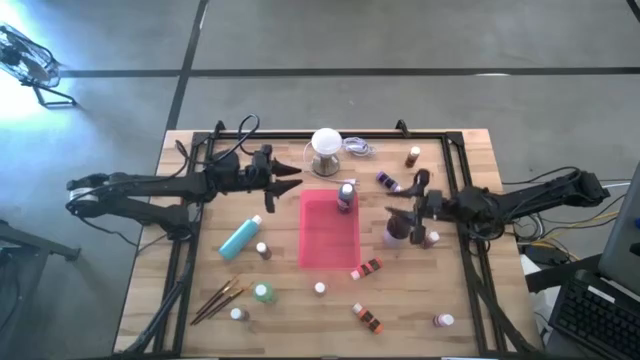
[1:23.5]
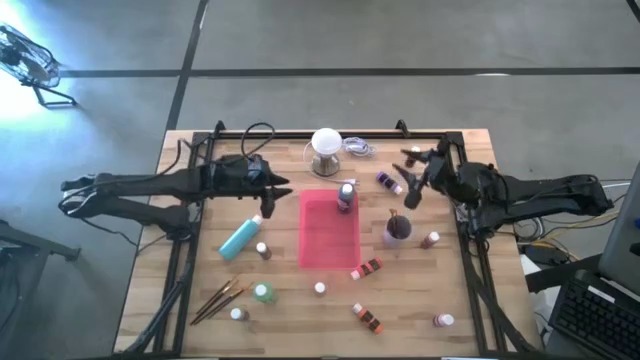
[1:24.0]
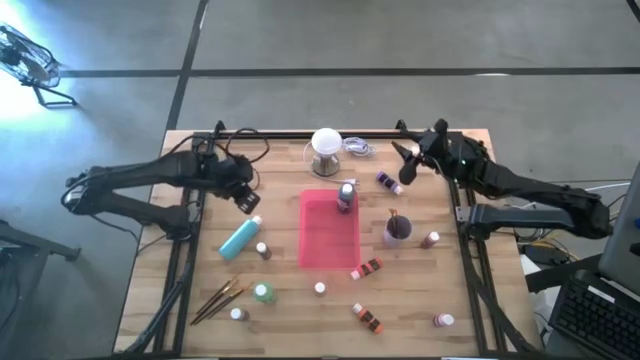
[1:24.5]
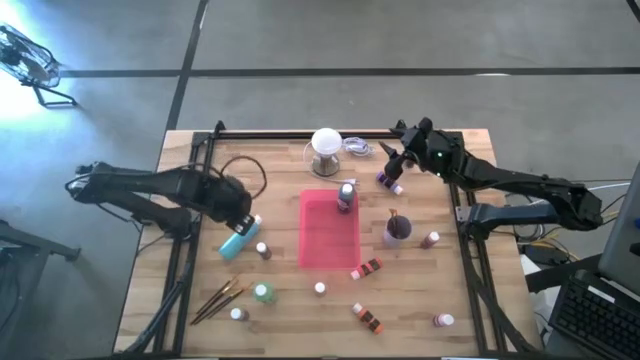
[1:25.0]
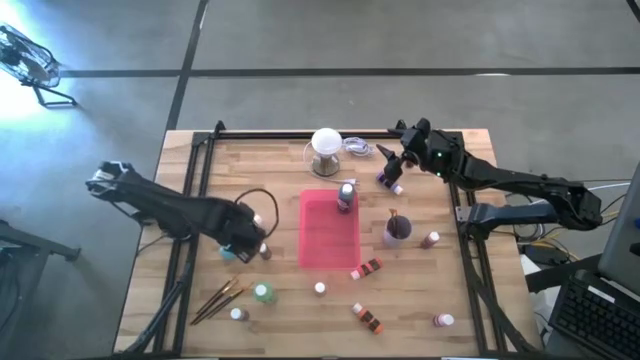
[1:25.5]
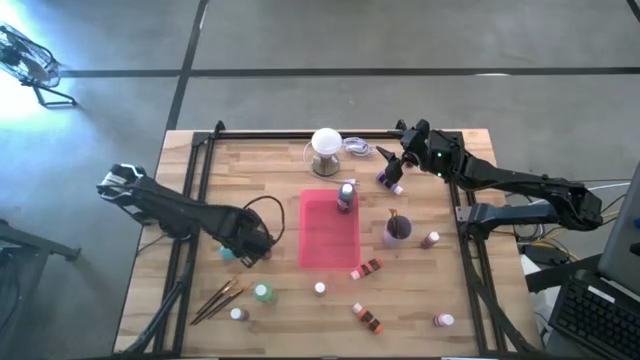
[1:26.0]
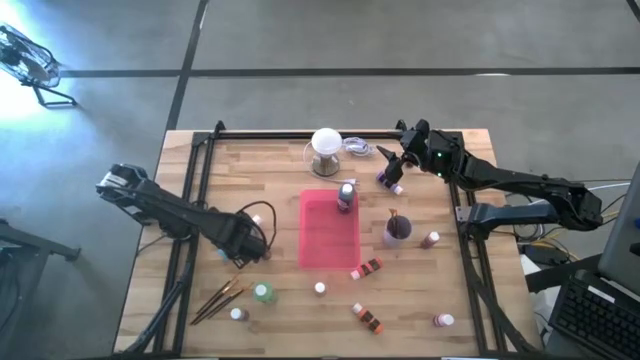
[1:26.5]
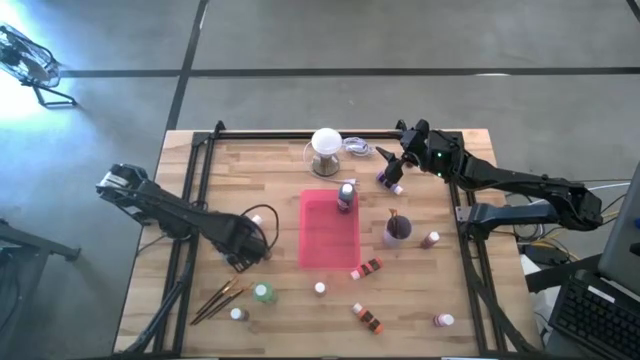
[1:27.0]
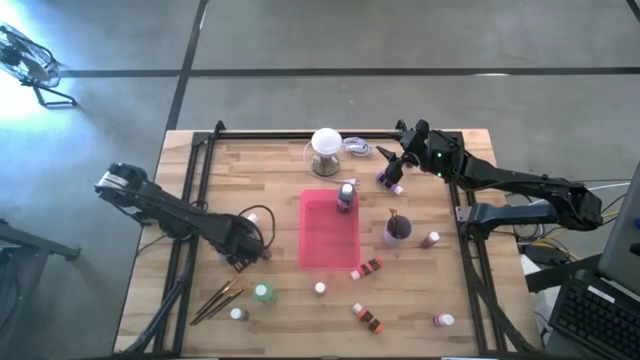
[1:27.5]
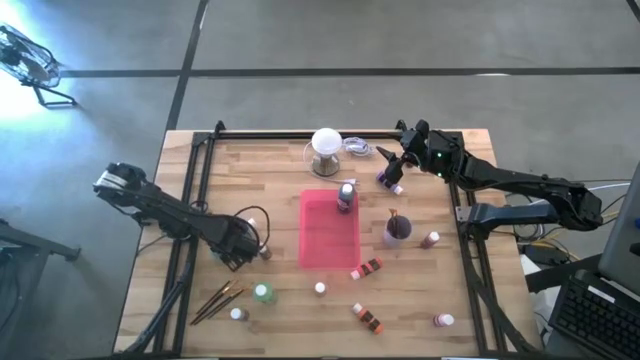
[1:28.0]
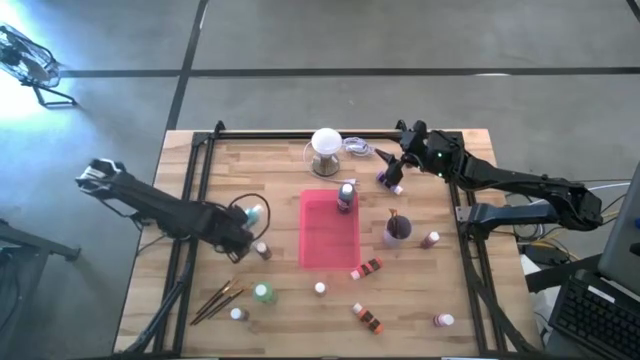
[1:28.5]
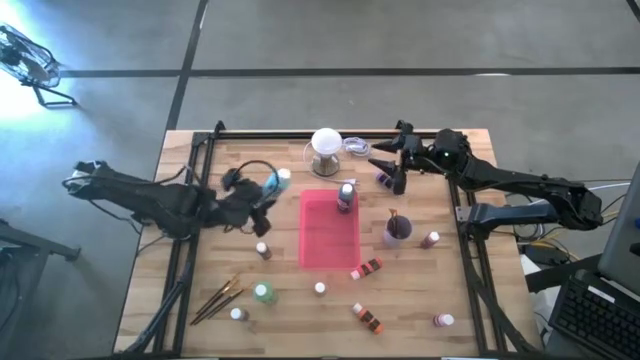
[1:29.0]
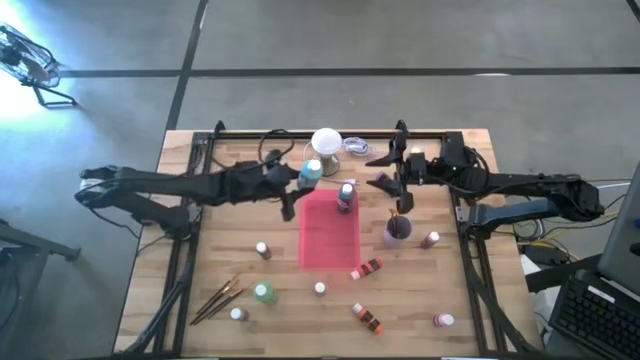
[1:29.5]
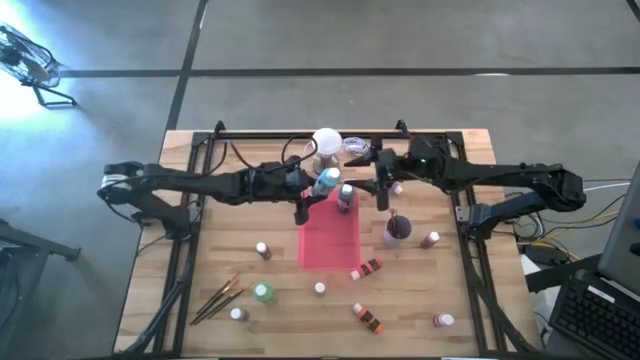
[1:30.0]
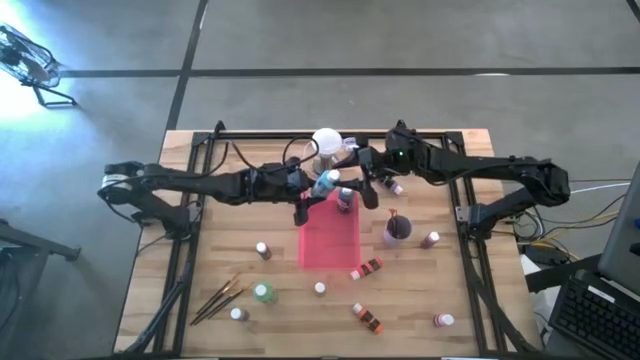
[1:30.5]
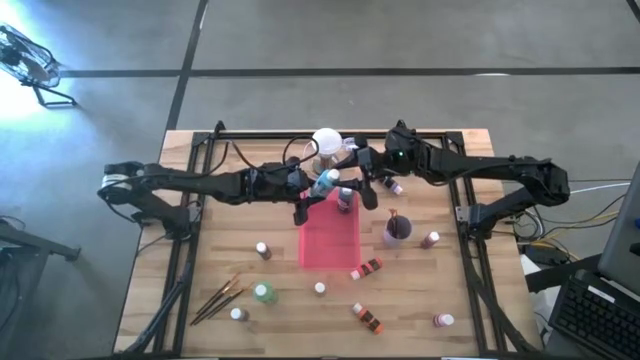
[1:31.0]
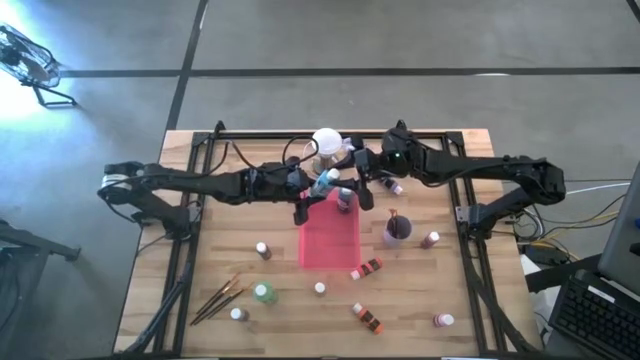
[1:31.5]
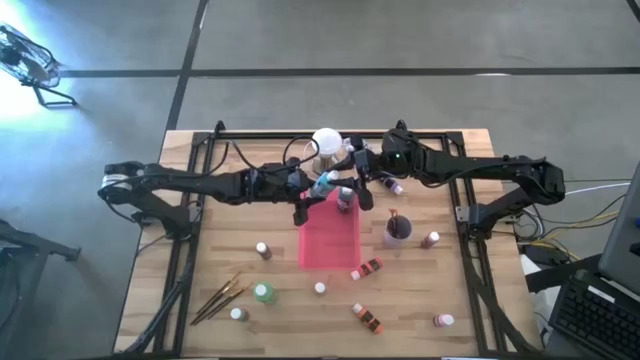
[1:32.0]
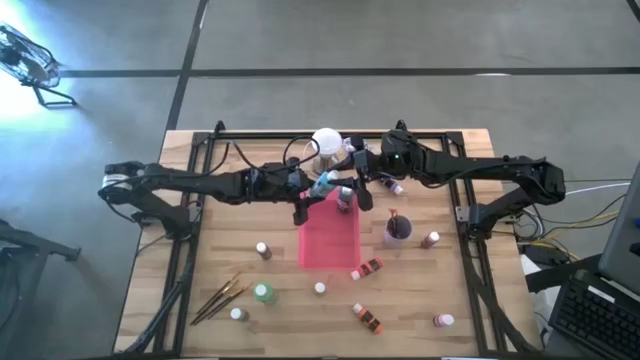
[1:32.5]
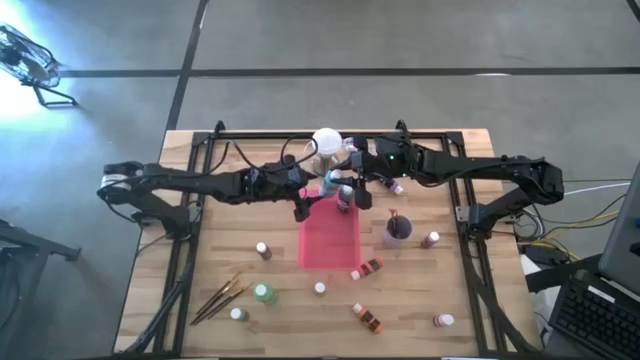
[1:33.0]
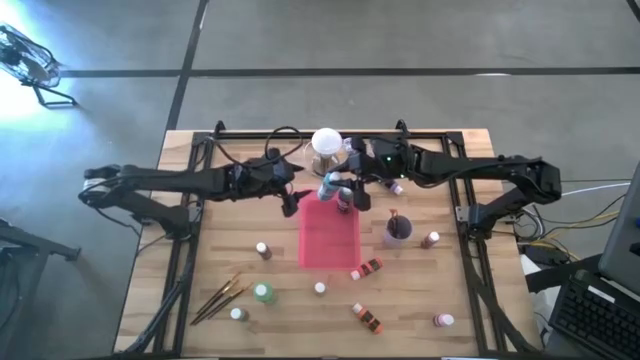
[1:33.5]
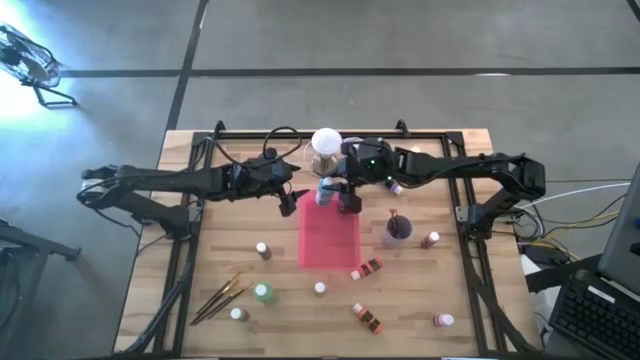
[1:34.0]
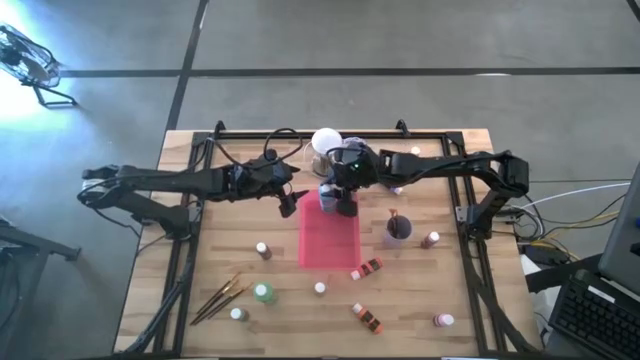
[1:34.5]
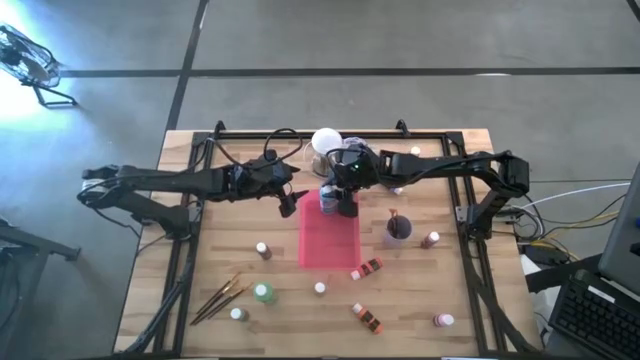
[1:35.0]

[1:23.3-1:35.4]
Task: Pick & Place Paint Supplies
Put the large blue paint bottle into the red bin

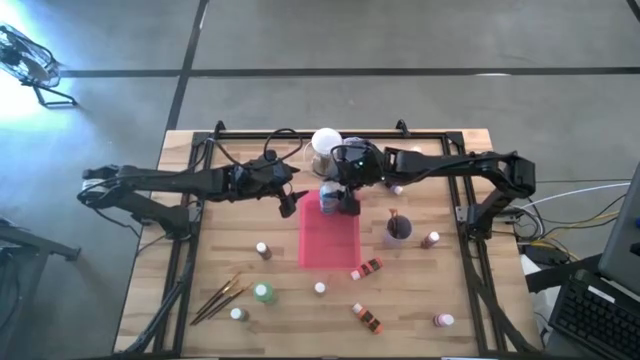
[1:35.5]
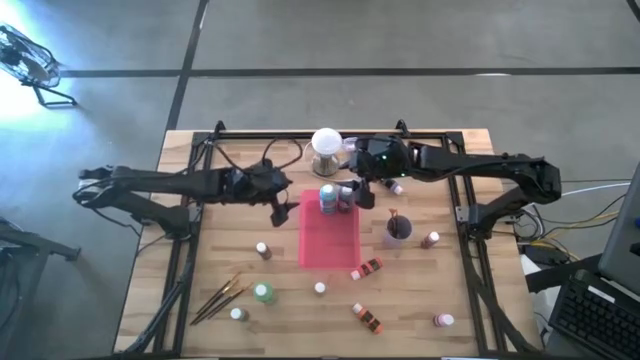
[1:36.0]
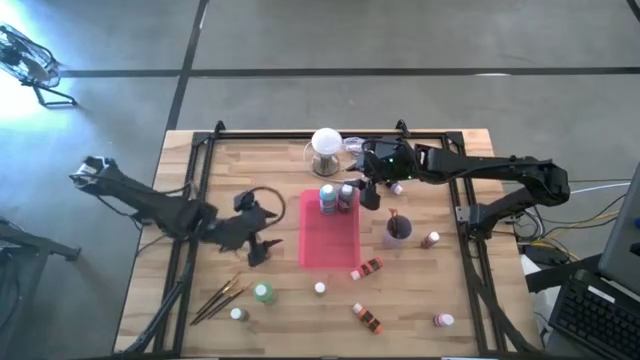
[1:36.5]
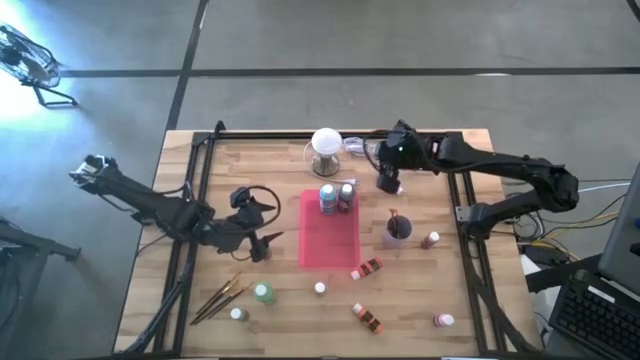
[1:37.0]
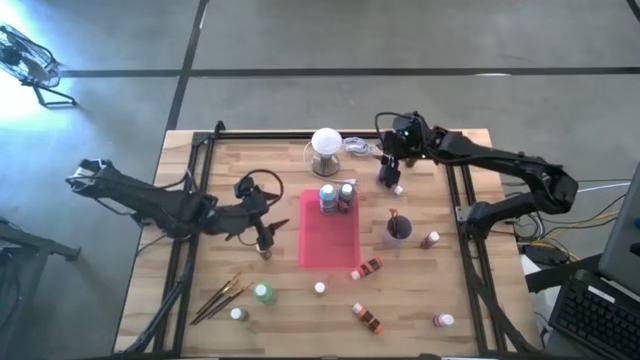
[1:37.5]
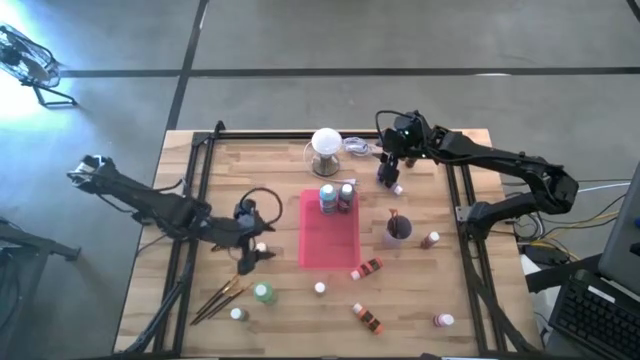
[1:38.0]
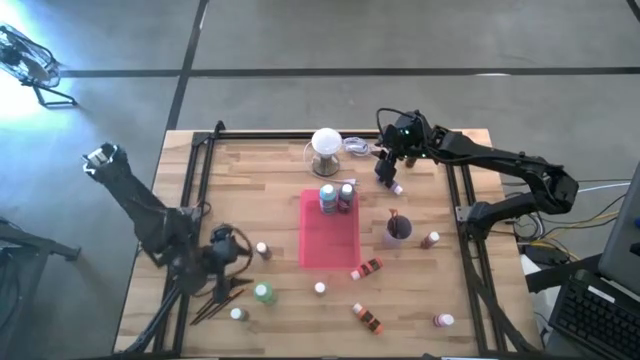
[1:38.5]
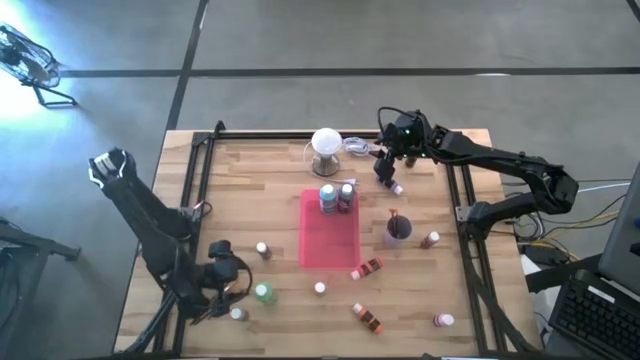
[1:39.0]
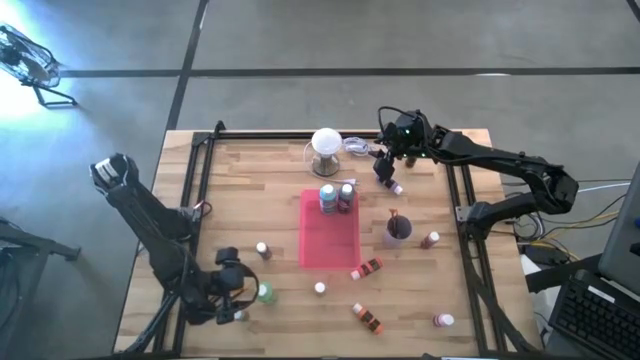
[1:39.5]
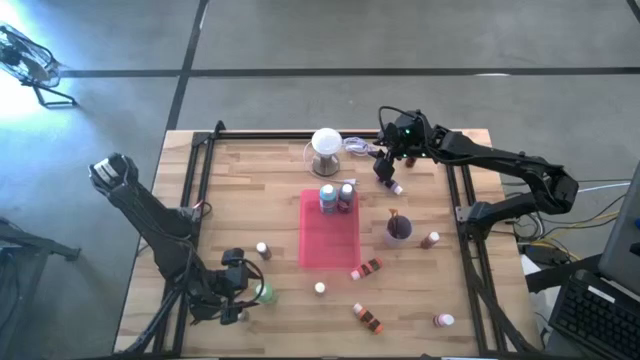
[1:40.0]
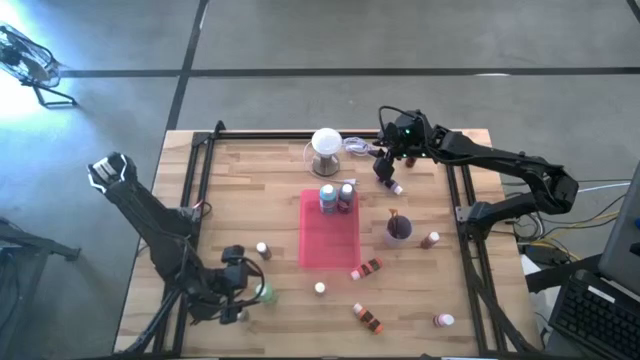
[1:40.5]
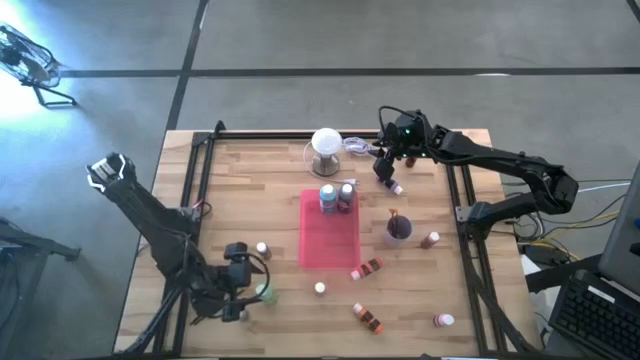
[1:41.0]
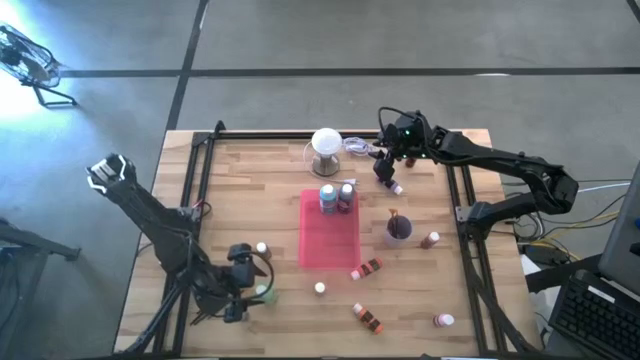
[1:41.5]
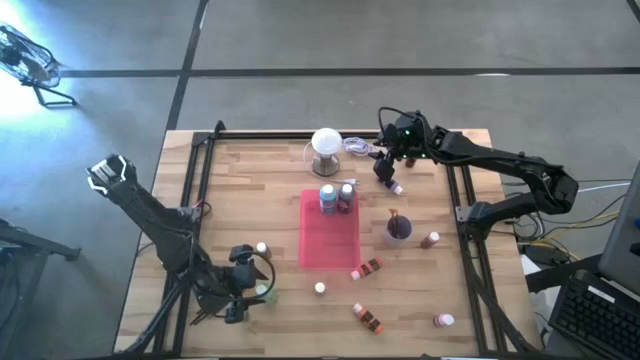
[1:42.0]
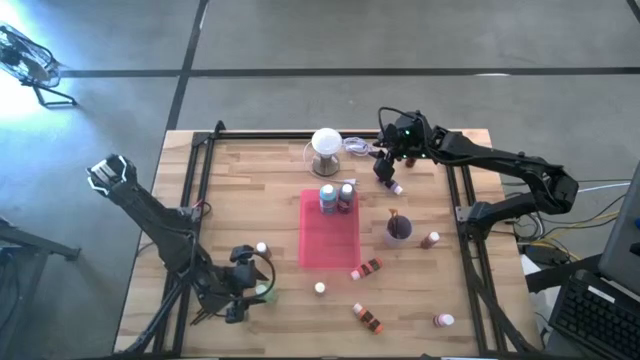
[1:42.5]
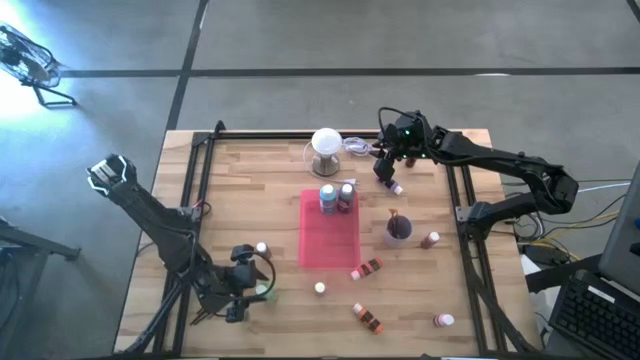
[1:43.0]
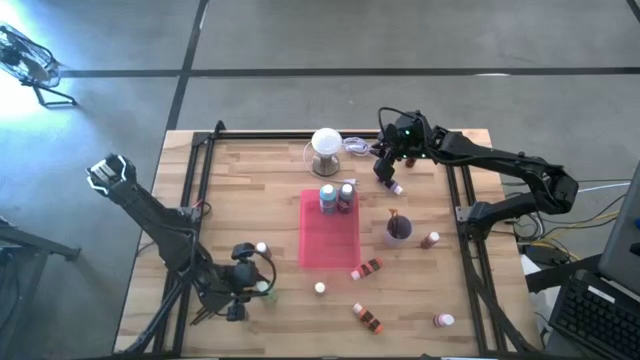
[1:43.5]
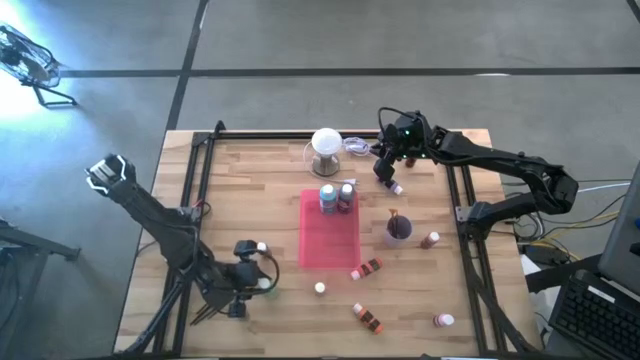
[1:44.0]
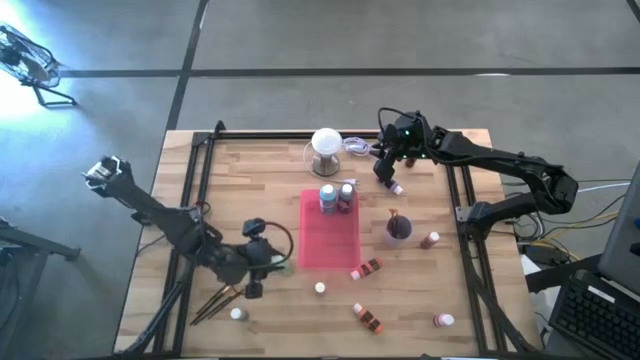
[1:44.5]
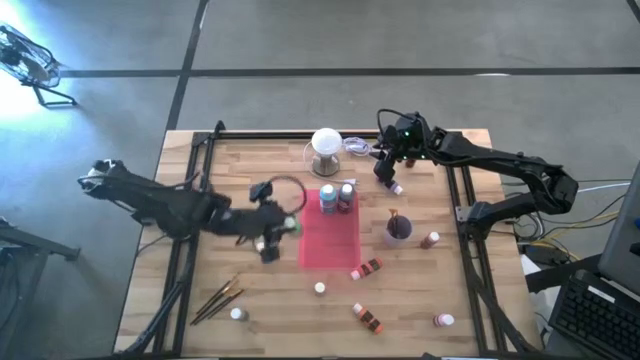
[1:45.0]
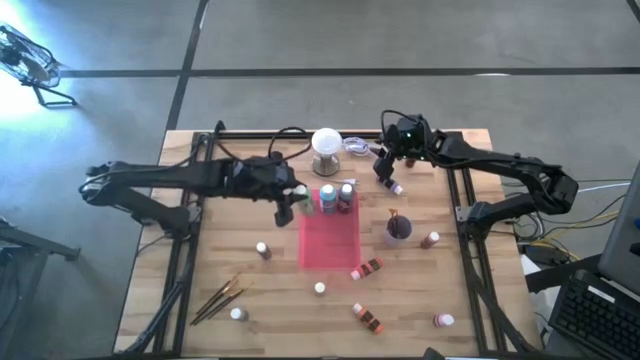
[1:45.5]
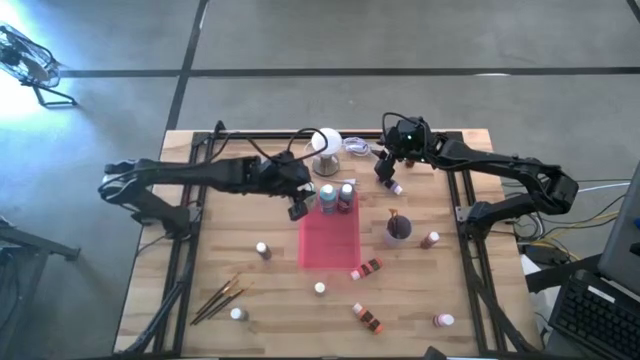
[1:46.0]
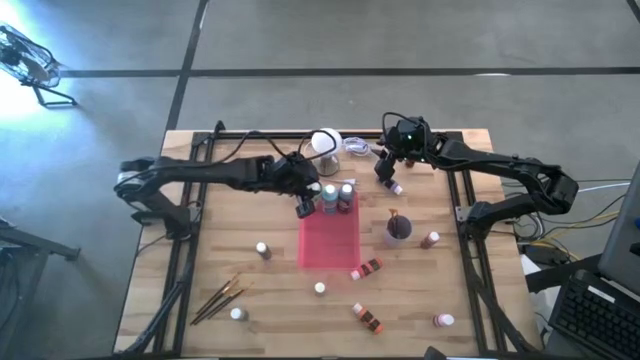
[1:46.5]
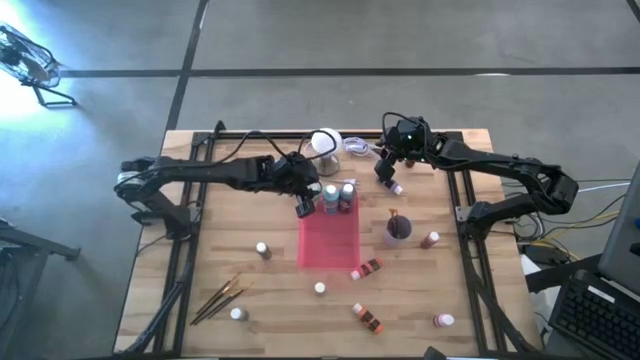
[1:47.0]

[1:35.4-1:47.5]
Put the large green paint bottle into the red bin
